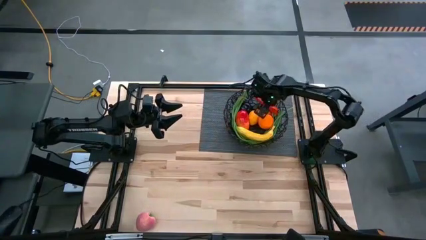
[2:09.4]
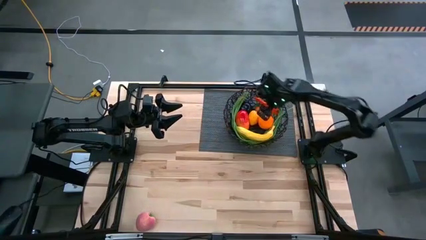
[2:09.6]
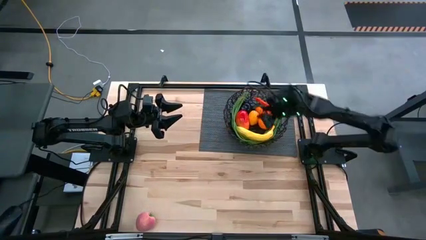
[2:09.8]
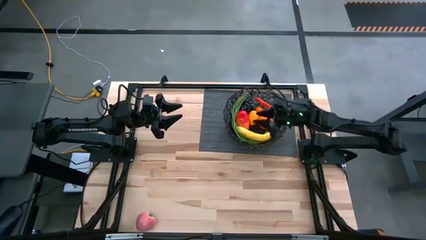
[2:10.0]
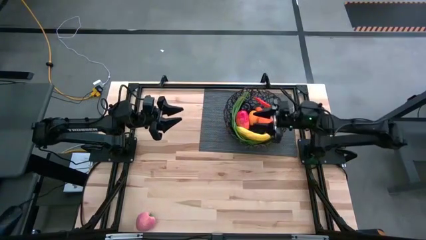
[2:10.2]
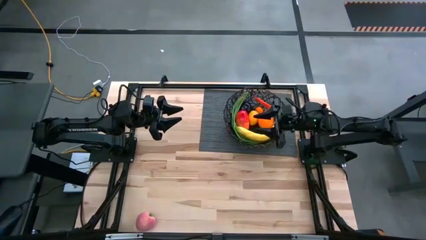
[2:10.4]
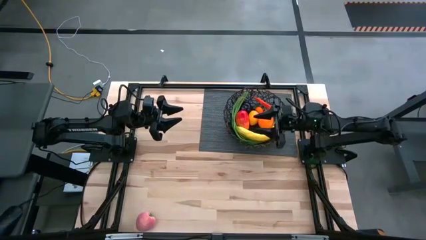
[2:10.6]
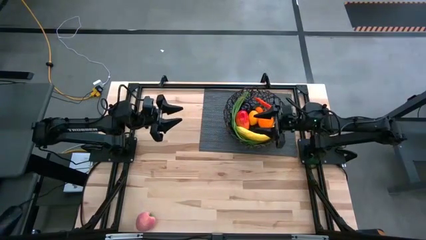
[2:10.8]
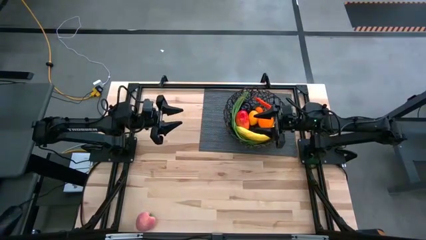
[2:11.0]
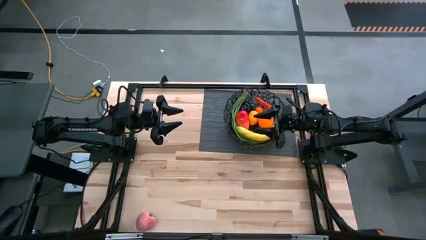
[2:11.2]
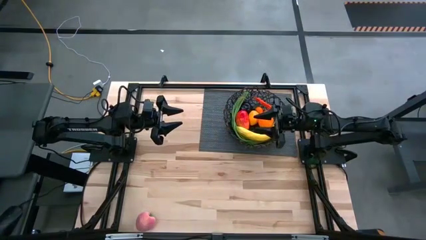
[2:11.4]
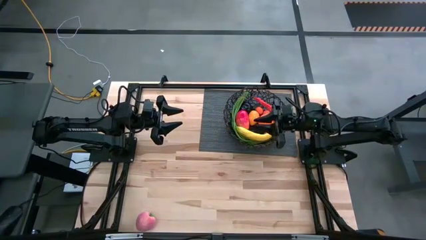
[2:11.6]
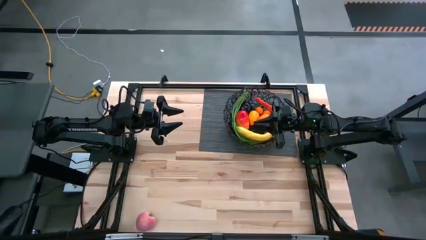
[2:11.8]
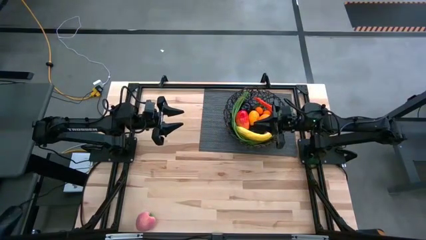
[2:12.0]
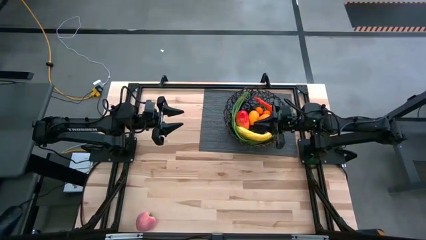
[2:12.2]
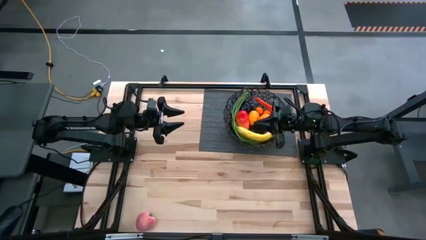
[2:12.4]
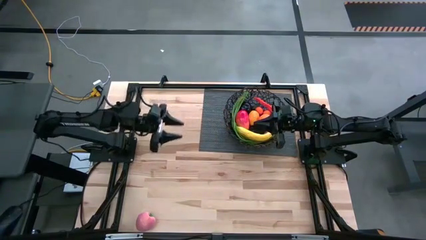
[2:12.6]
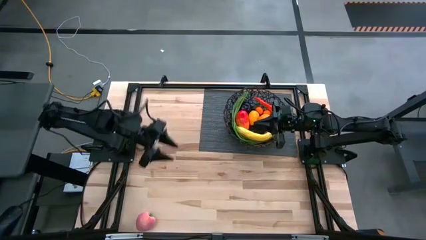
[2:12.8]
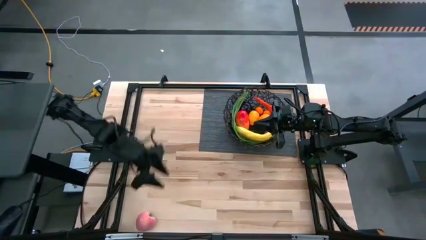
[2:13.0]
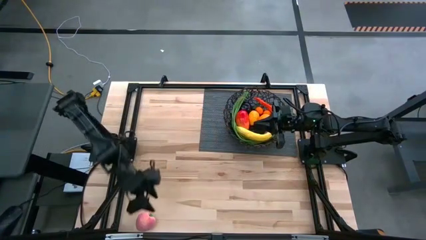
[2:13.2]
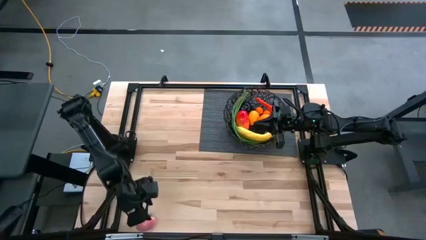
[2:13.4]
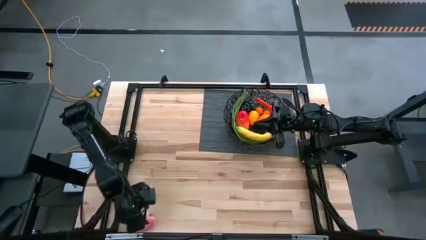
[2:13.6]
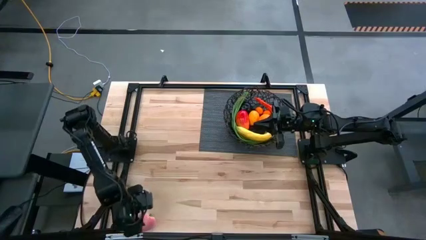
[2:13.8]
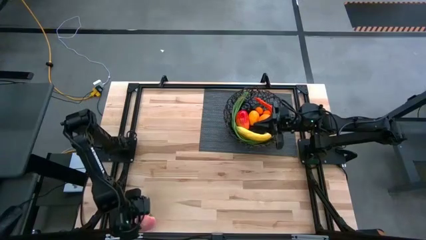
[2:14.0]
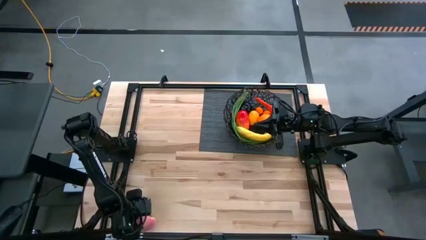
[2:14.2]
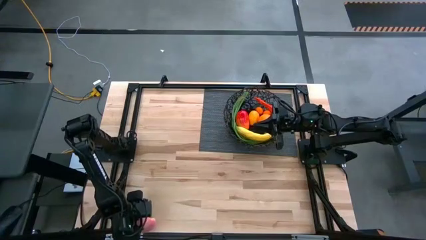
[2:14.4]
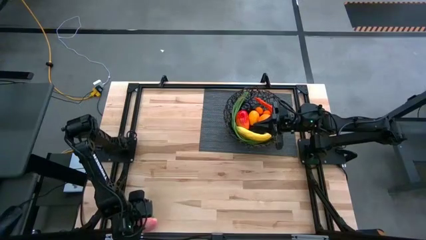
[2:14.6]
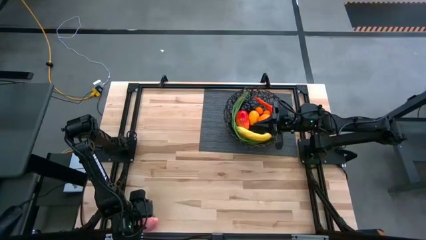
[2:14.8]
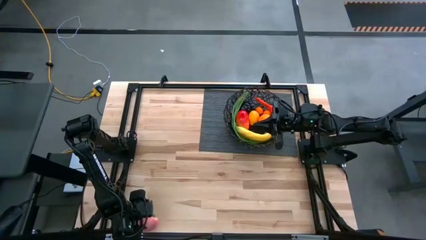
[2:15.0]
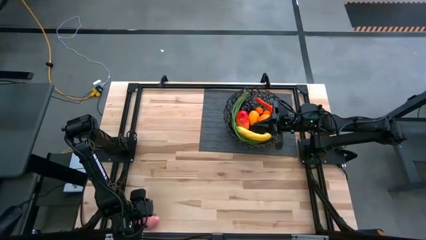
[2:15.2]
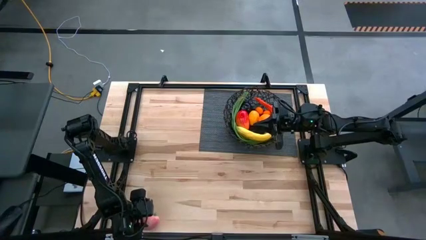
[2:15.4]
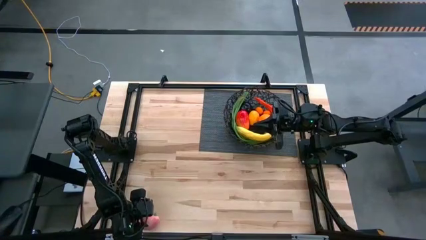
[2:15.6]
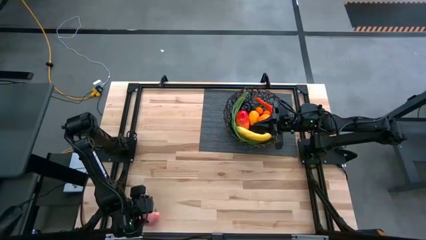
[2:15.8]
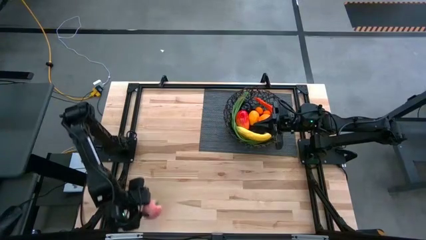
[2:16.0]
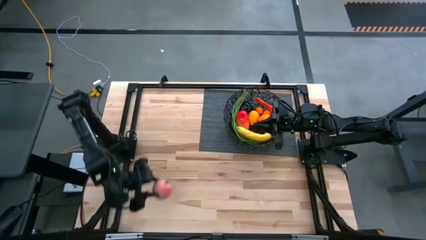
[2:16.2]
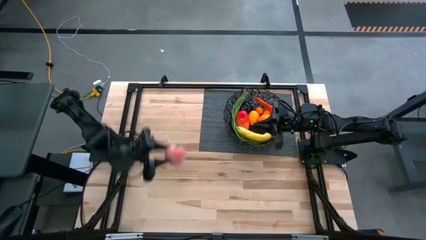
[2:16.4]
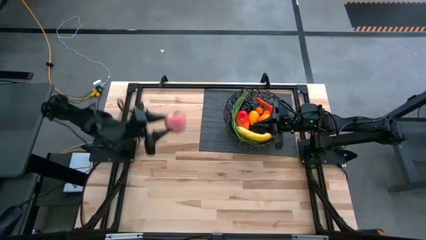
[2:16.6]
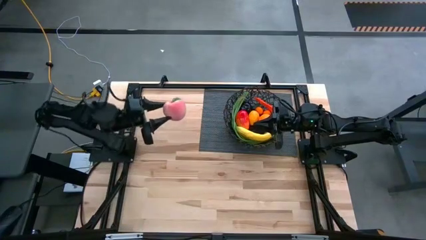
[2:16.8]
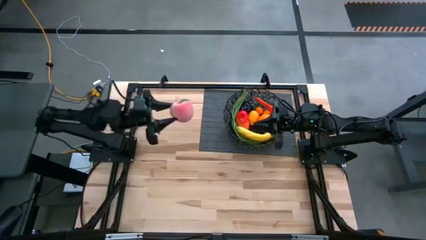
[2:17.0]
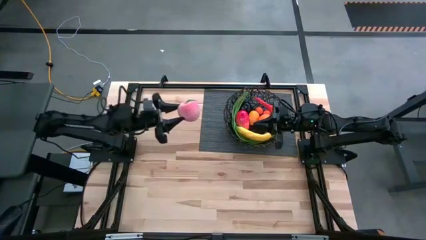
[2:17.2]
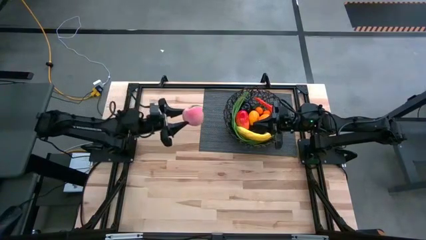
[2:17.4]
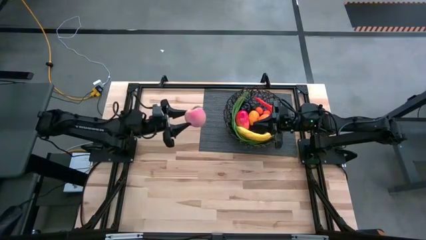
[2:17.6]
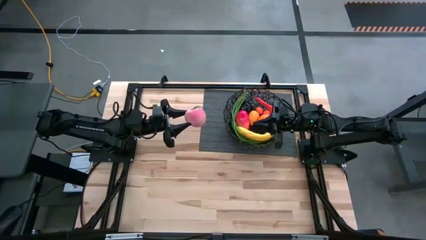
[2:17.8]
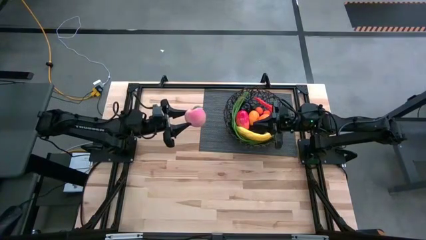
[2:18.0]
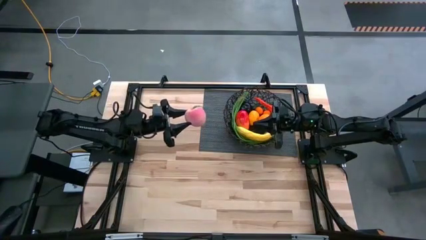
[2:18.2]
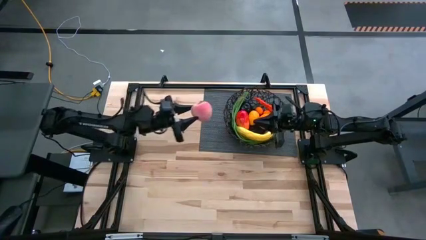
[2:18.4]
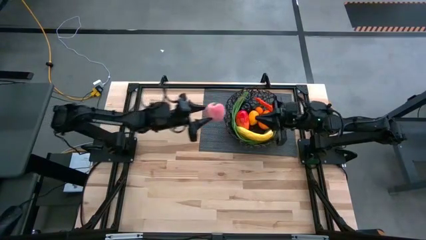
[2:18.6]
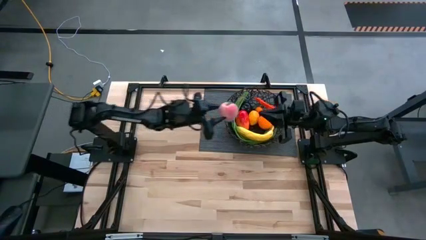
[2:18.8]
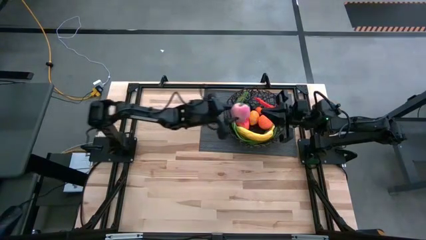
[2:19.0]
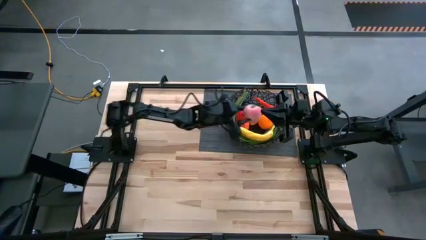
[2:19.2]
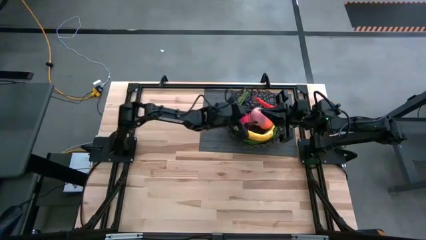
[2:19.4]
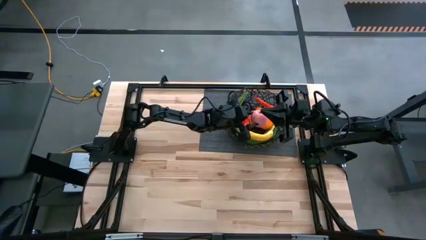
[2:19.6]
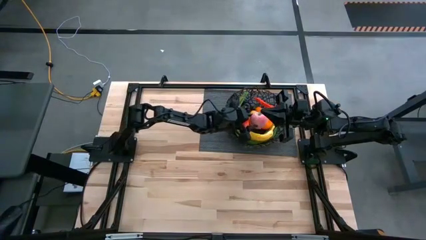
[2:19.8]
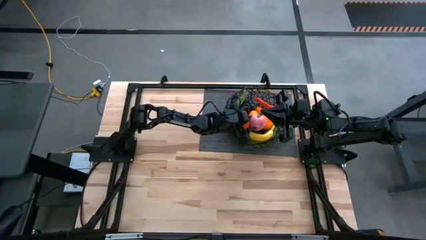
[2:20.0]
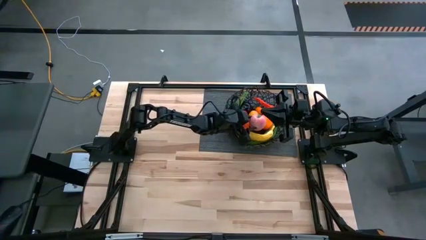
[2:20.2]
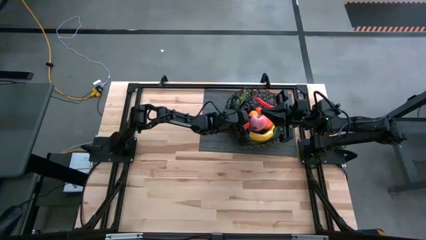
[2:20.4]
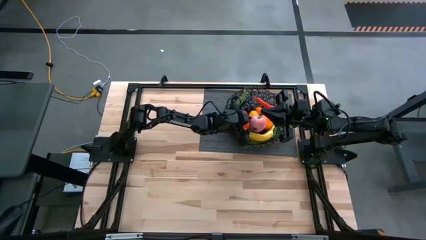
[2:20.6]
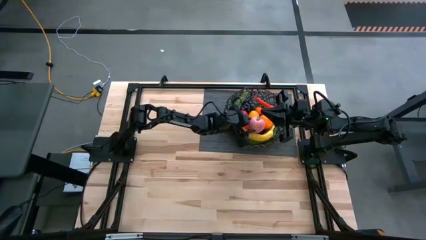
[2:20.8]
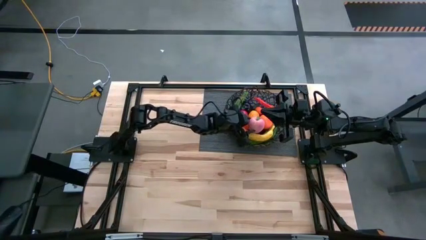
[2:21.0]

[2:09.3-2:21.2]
Task: Build produce basket
Put the peach into the wire basket

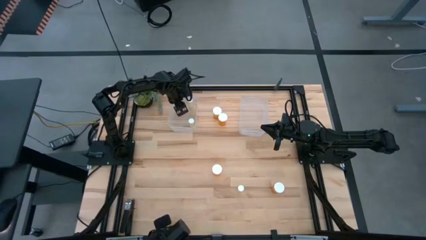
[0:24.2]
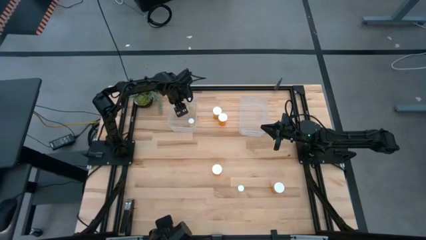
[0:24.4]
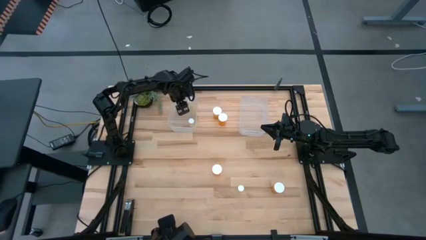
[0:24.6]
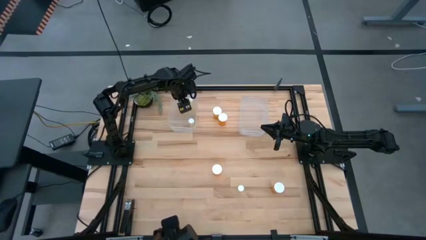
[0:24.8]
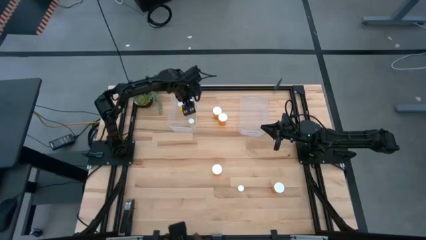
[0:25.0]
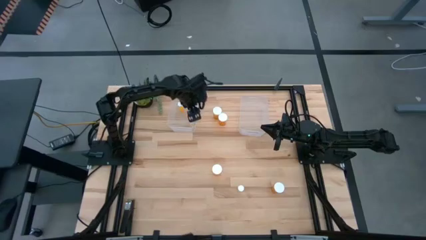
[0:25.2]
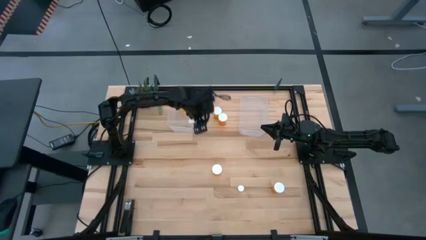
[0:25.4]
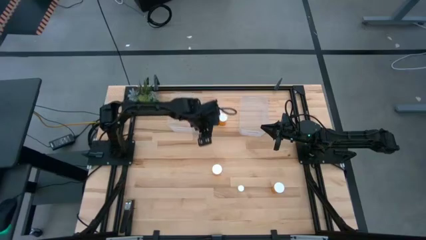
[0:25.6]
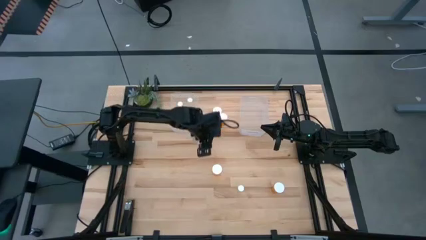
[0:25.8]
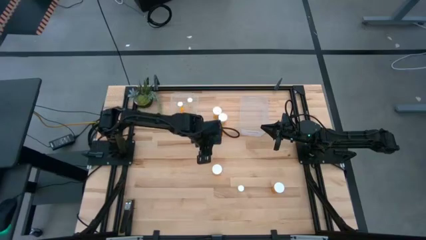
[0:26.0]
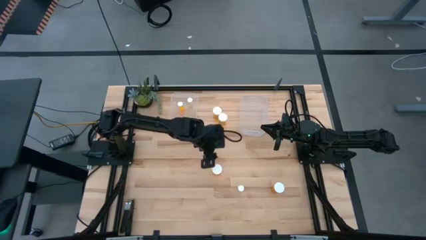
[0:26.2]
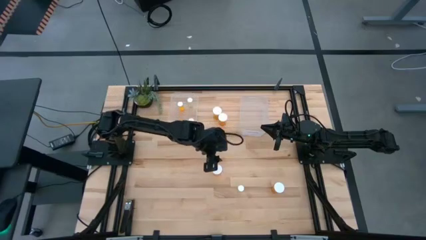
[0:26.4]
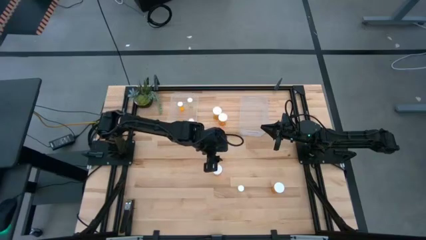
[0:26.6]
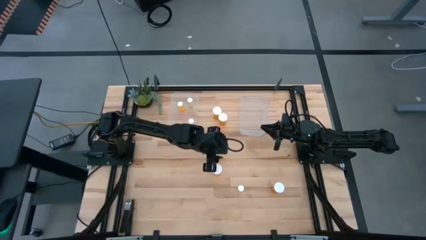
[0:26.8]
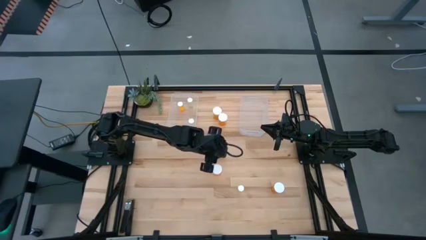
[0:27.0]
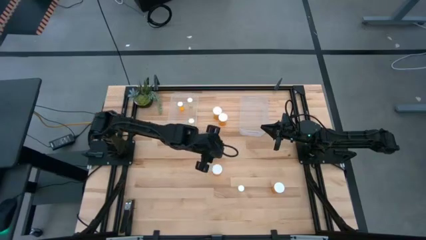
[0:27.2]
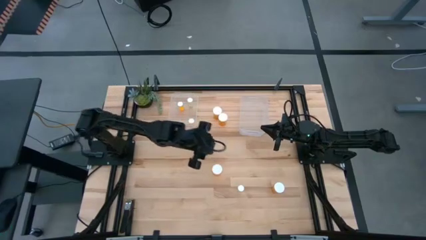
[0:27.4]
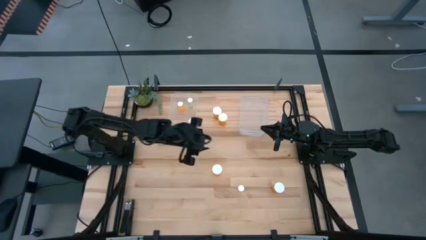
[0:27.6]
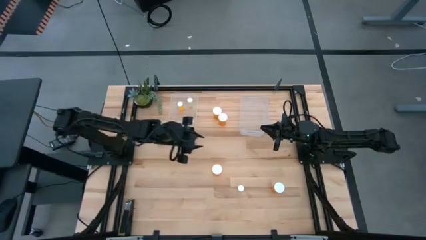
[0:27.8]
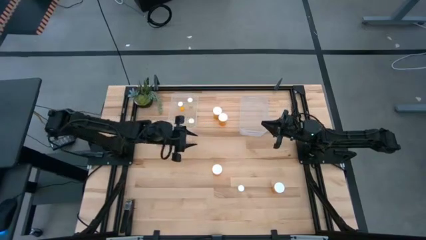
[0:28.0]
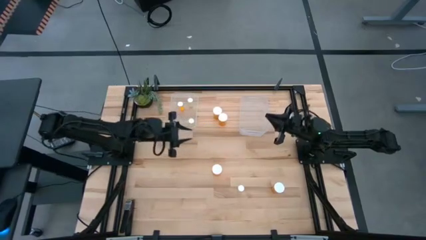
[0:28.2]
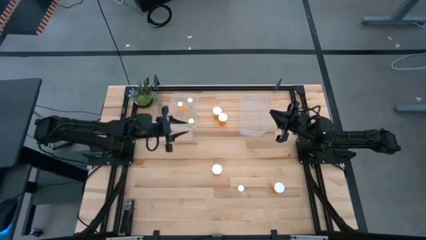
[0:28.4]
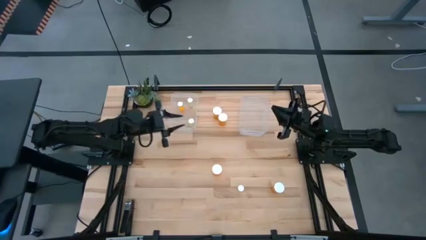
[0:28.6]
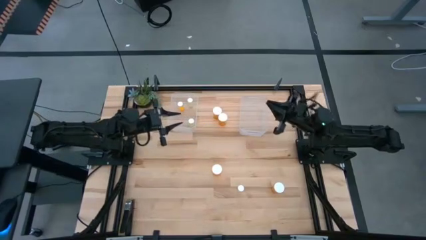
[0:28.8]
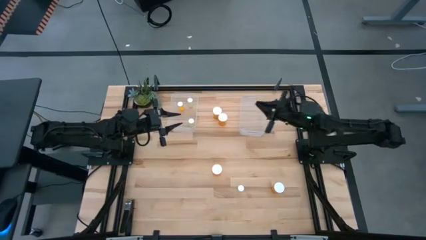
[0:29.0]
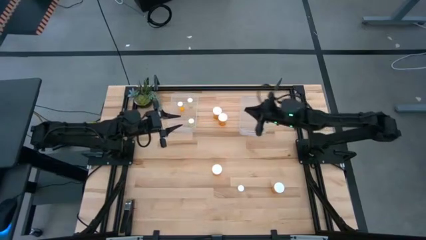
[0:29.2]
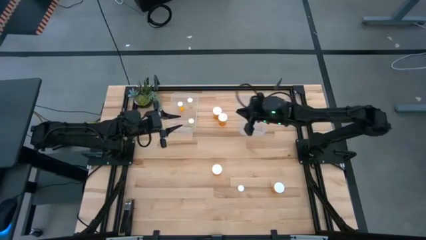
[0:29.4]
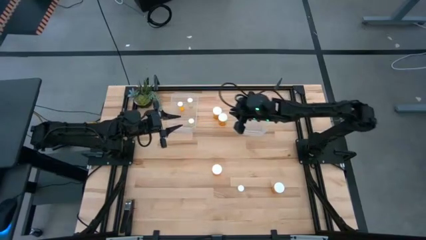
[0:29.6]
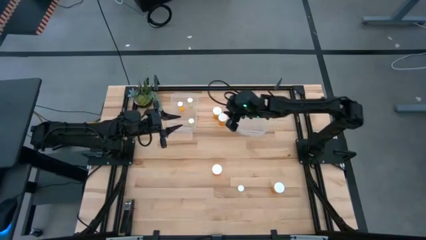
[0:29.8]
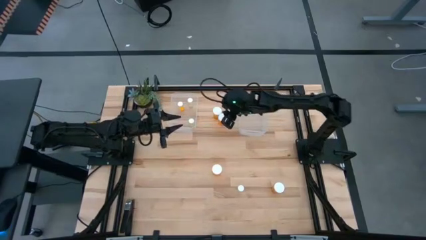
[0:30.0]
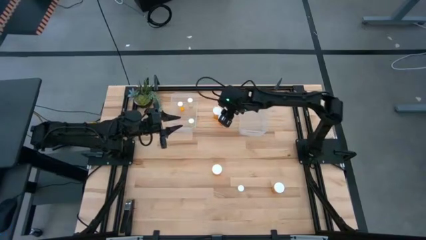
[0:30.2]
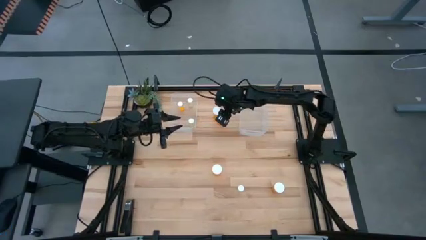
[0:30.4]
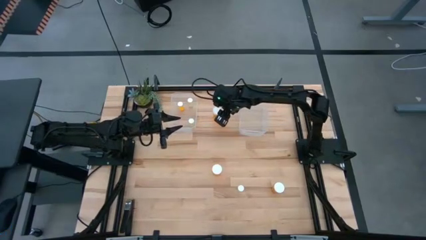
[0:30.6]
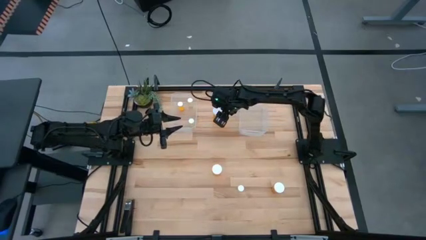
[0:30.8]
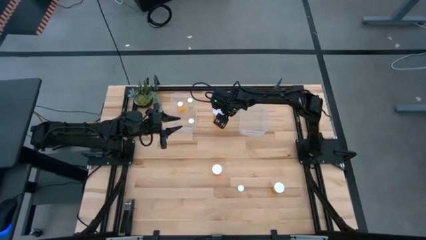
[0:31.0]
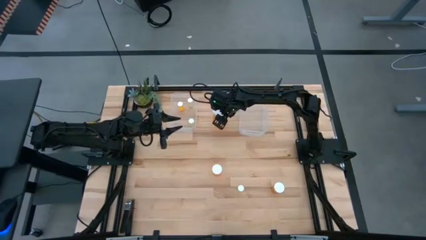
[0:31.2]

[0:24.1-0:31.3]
Task: Pick and place medicine bottles into bin by pill shape (circle, oval)
Put the large orange pill bottle into the right transparent bin
